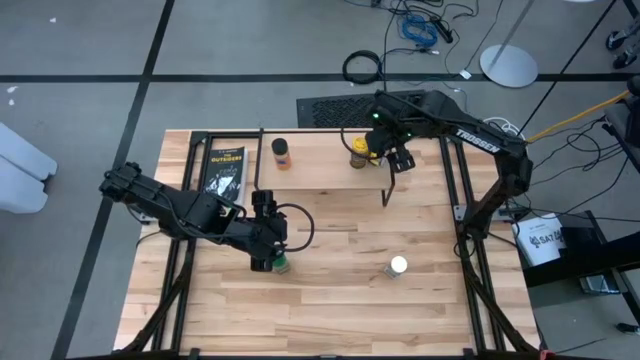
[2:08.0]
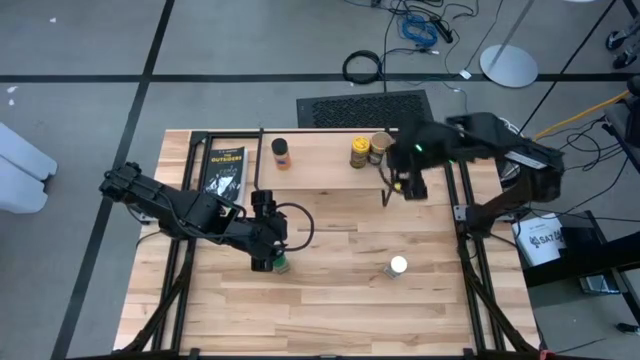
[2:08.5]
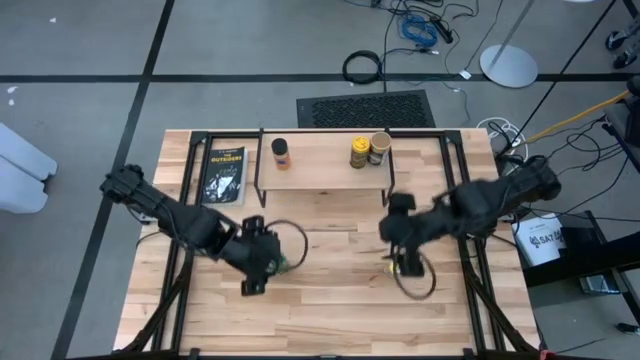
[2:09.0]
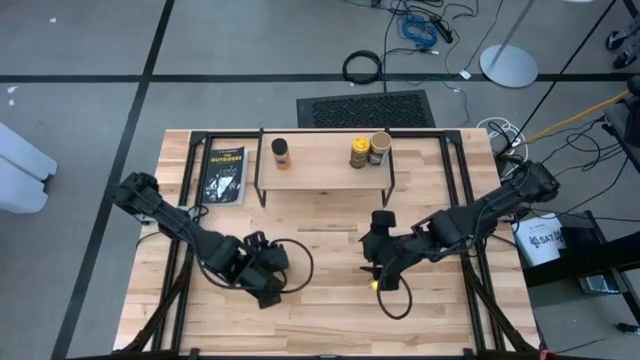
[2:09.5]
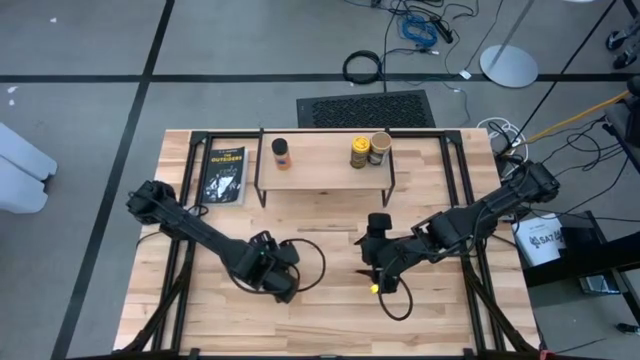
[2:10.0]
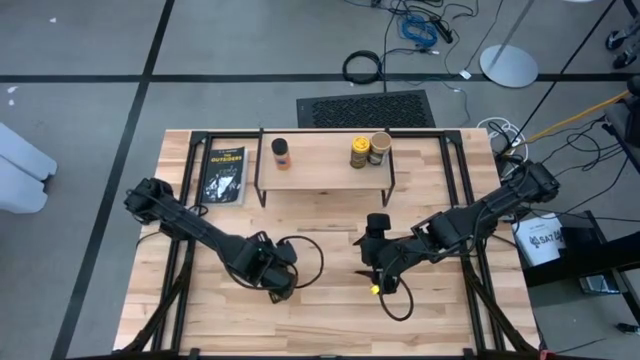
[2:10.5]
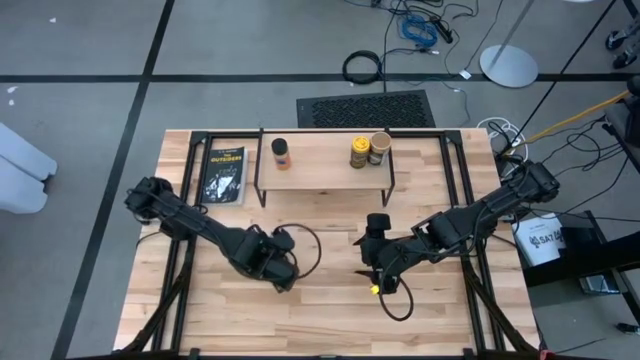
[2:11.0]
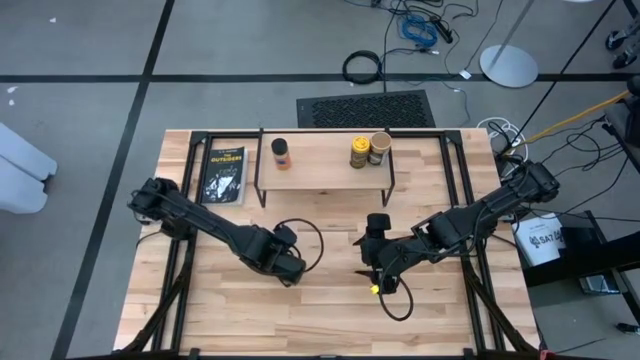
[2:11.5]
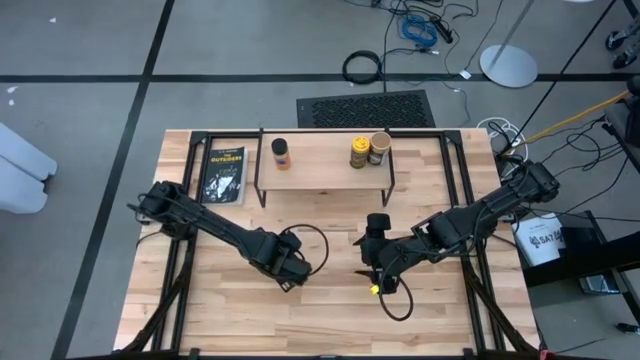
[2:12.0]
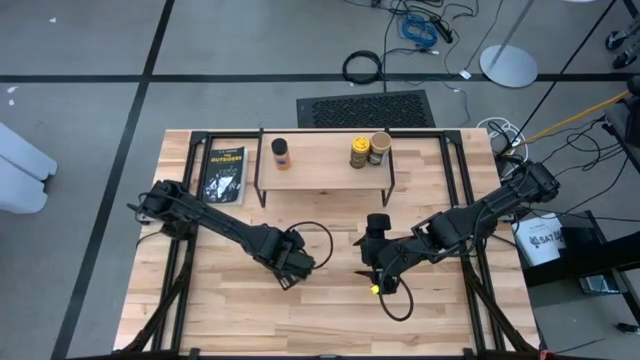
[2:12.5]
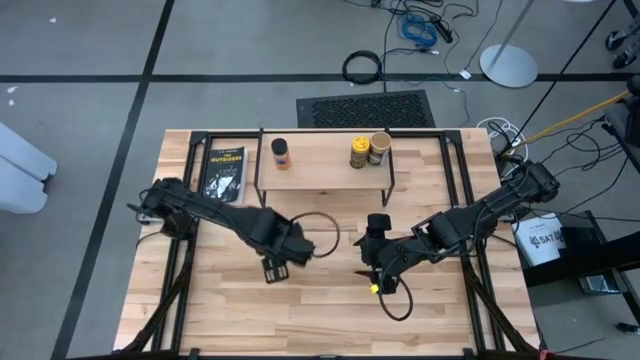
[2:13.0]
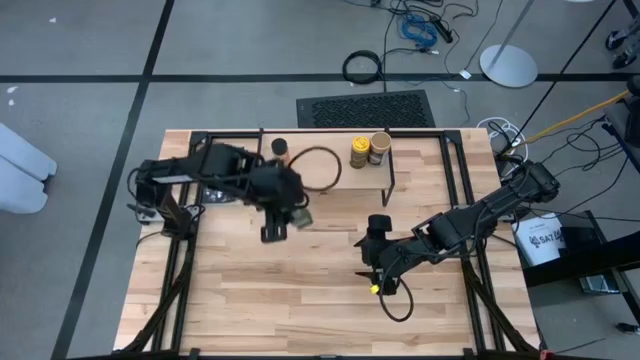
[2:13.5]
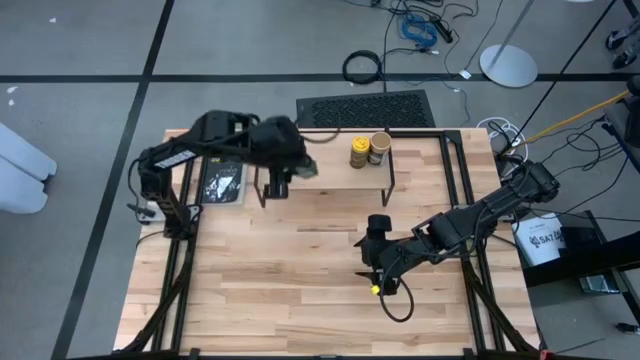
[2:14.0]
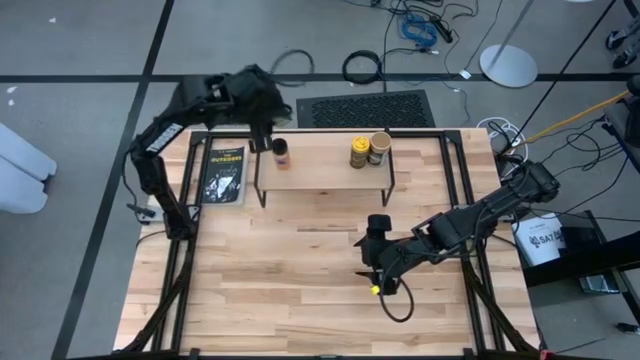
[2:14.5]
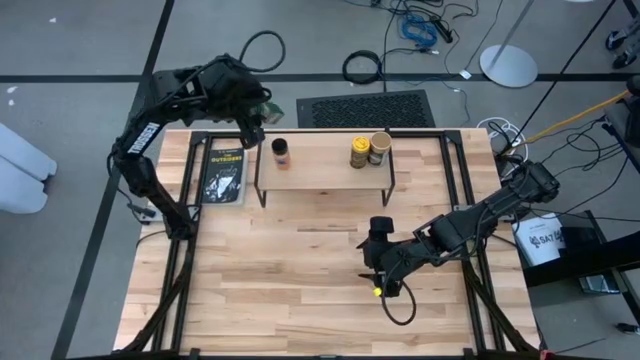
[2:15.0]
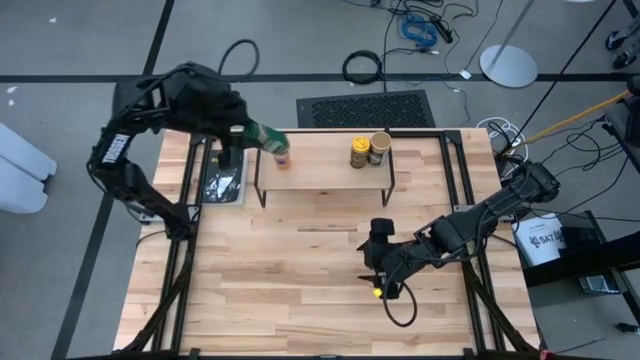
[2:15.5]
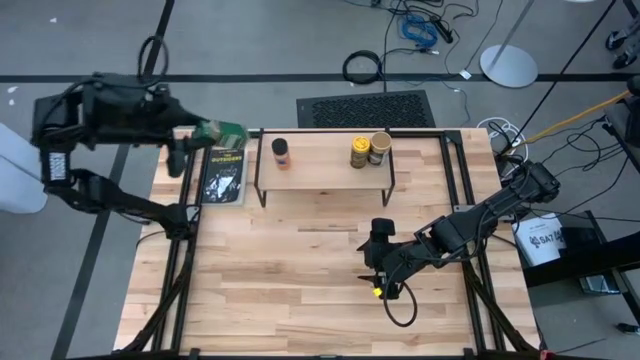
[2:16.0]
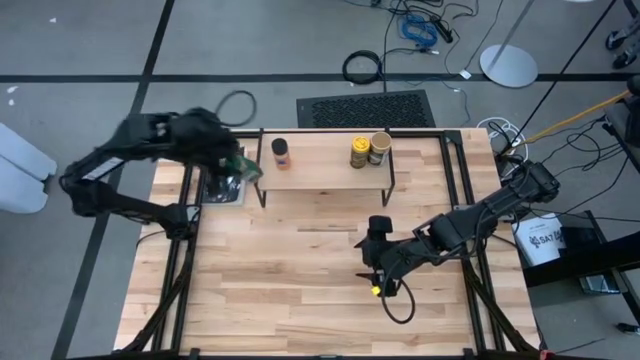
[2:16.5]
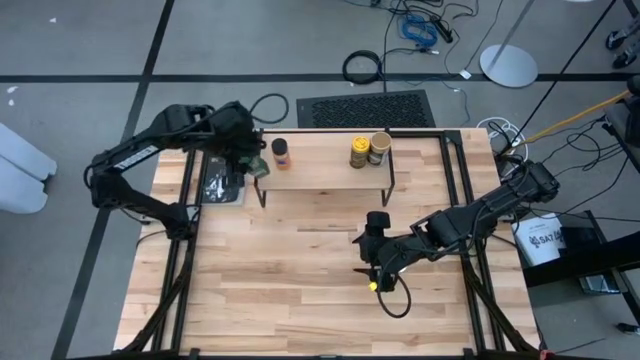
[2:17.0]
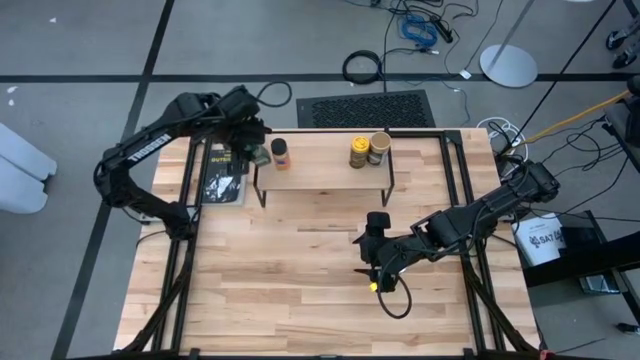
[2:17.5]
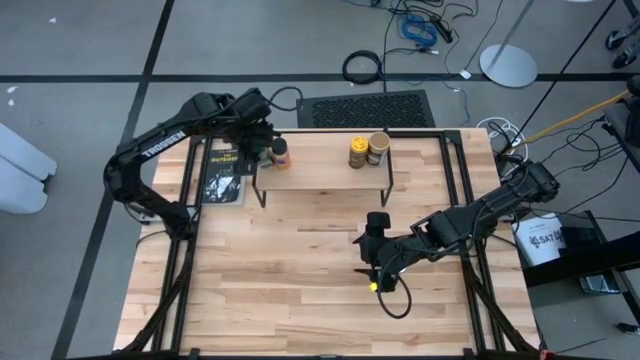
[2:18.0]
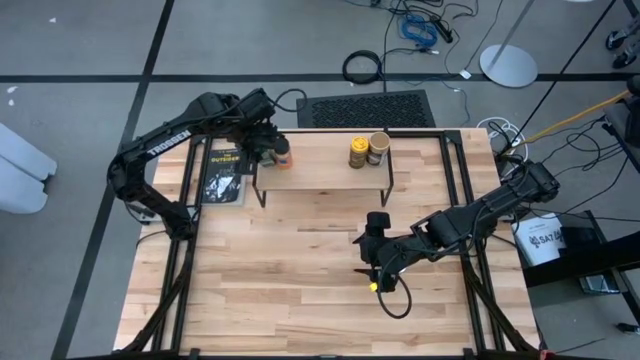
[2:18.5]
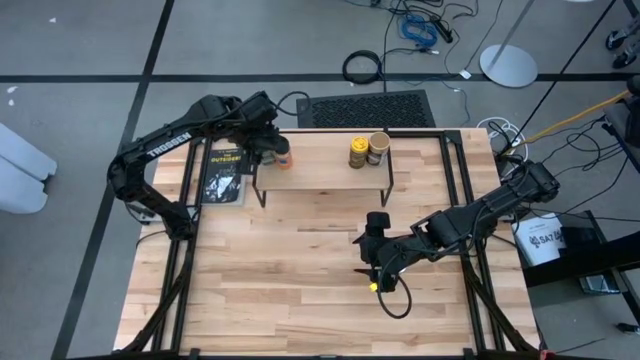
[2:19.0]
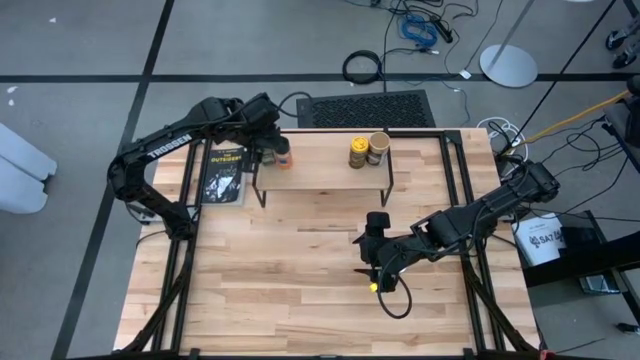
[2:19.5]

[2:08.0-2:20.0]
Task: Shelf spices
Put the green seasoning bottle on the shelf
